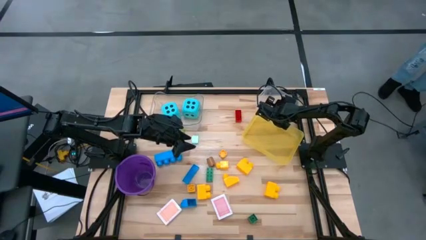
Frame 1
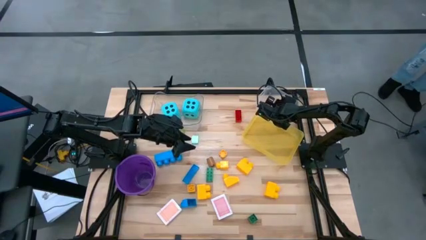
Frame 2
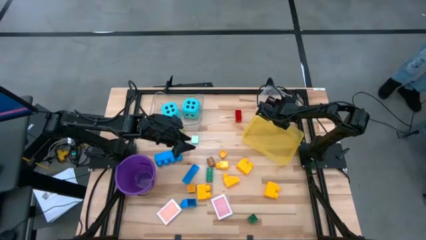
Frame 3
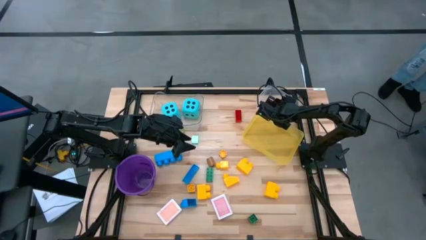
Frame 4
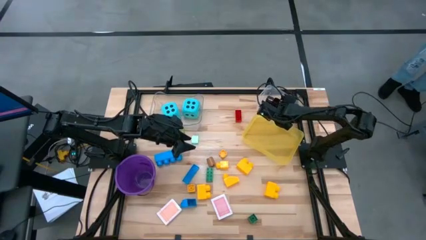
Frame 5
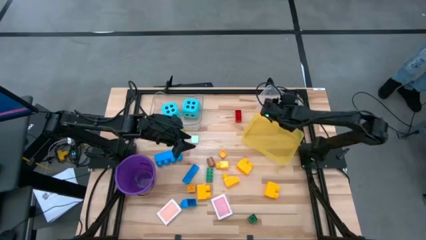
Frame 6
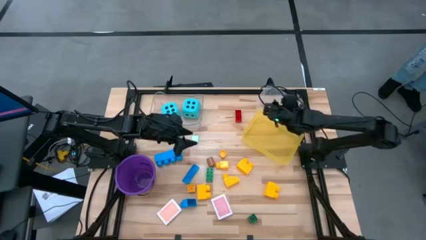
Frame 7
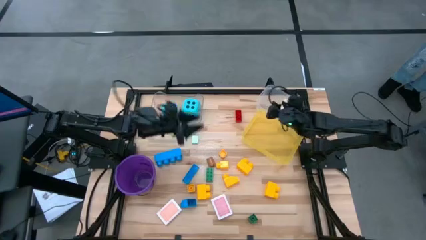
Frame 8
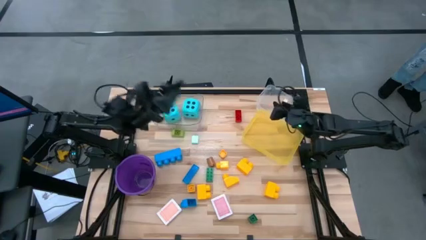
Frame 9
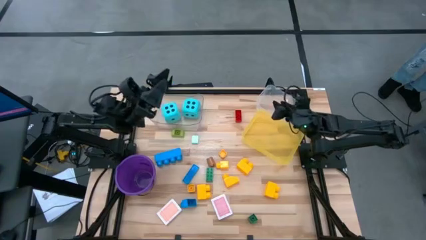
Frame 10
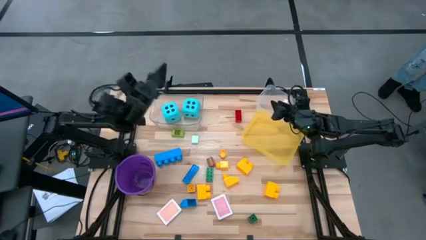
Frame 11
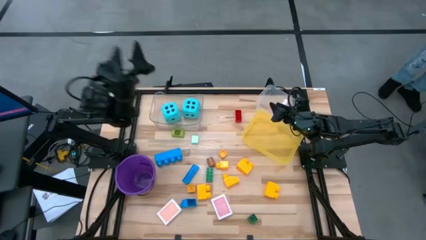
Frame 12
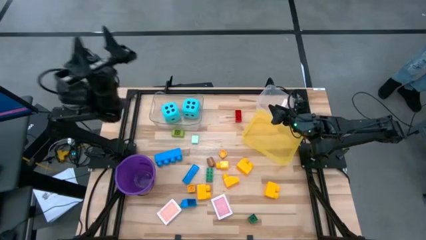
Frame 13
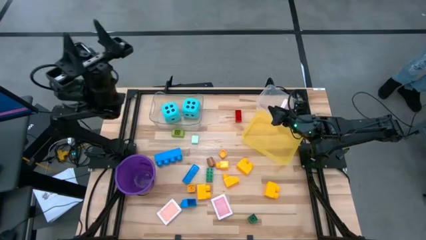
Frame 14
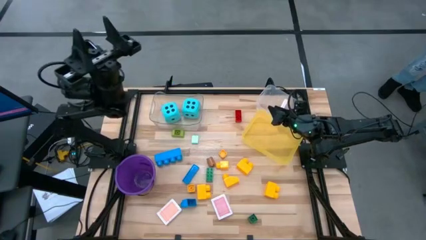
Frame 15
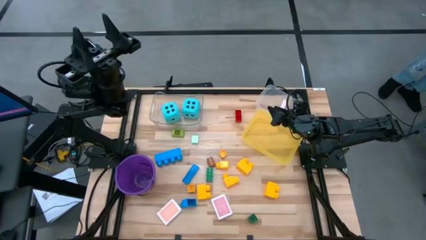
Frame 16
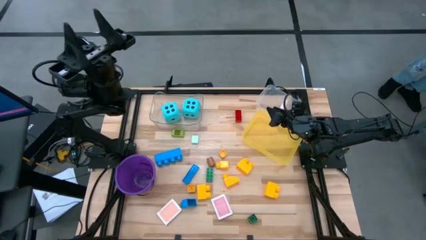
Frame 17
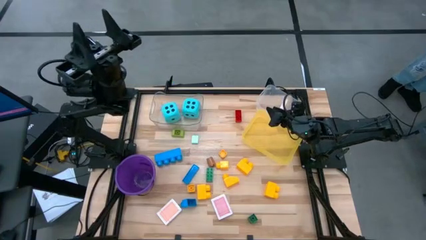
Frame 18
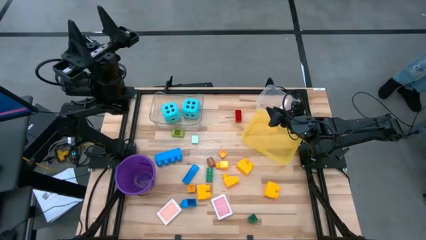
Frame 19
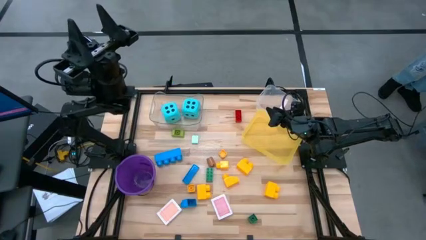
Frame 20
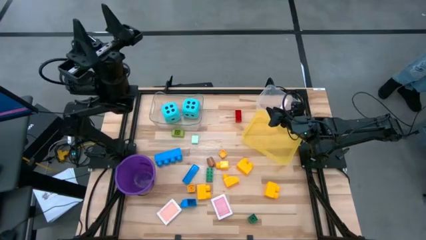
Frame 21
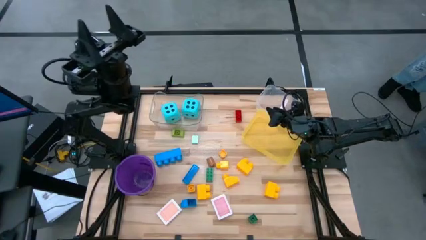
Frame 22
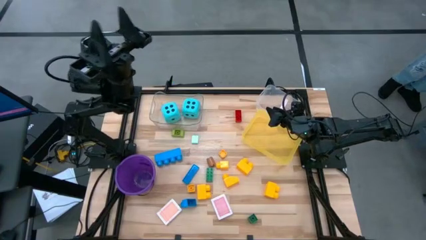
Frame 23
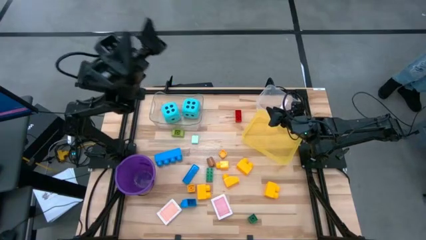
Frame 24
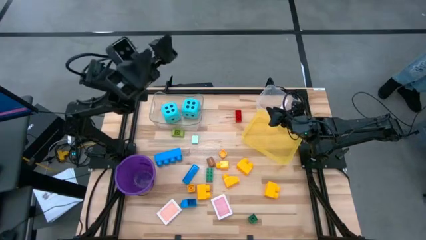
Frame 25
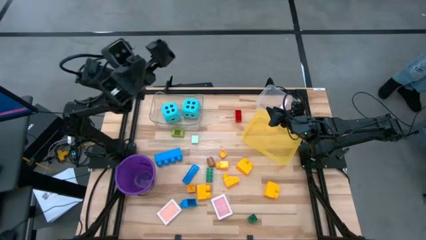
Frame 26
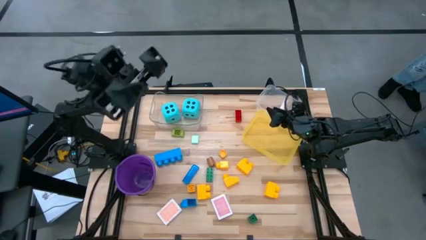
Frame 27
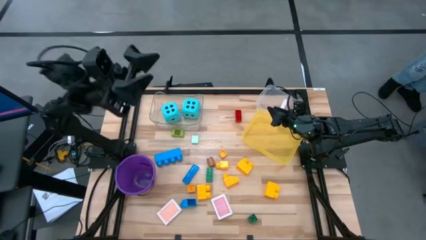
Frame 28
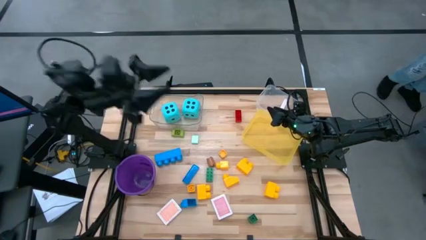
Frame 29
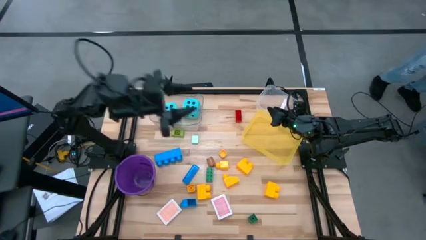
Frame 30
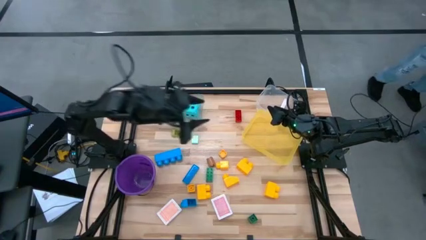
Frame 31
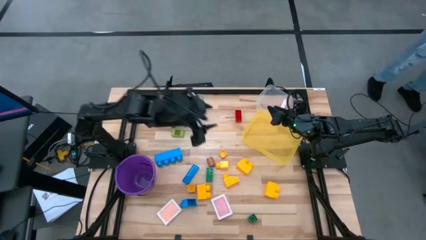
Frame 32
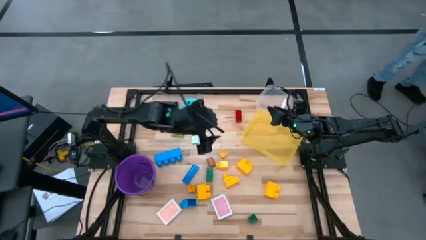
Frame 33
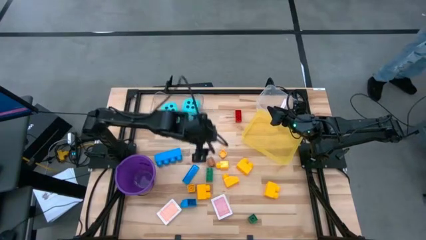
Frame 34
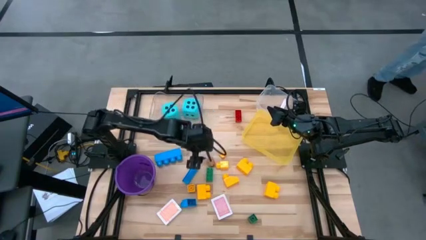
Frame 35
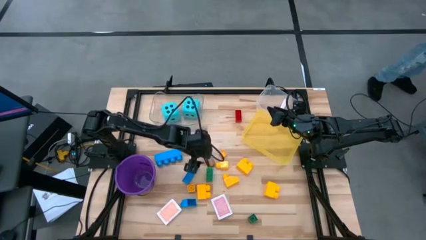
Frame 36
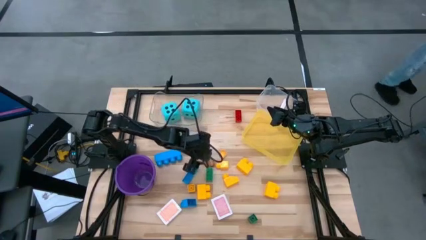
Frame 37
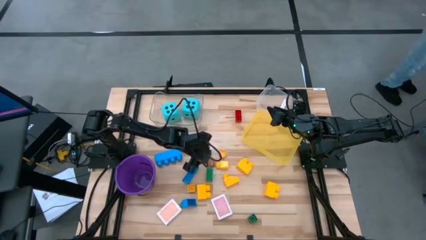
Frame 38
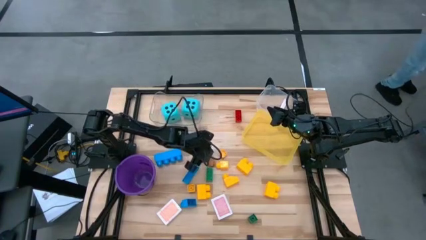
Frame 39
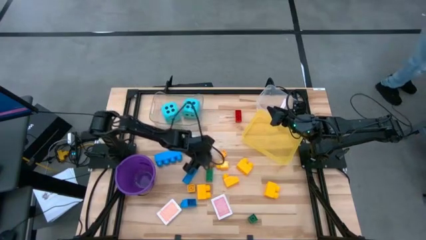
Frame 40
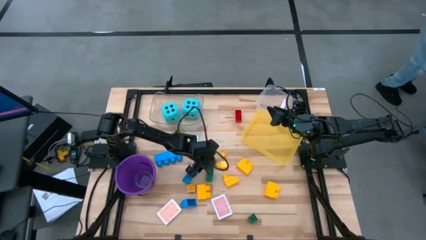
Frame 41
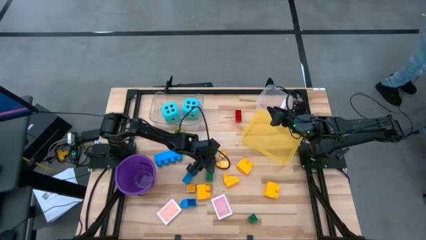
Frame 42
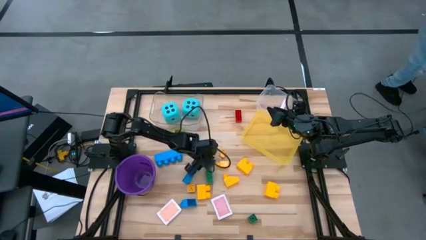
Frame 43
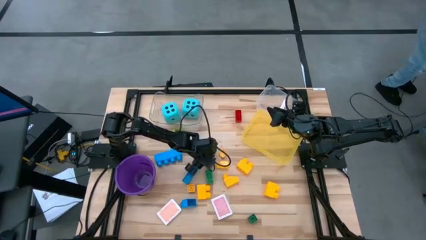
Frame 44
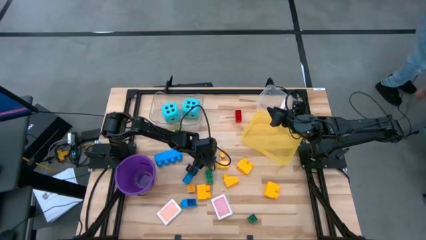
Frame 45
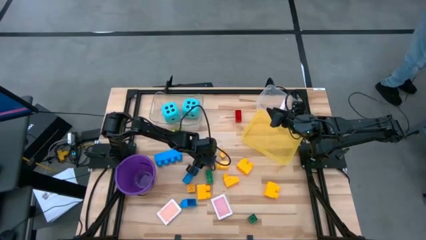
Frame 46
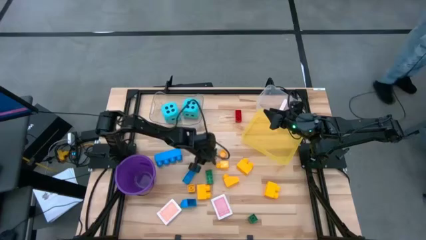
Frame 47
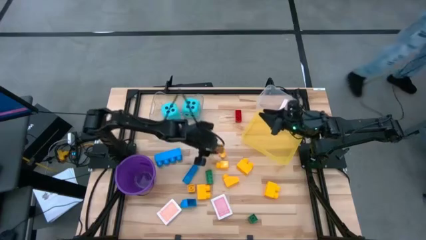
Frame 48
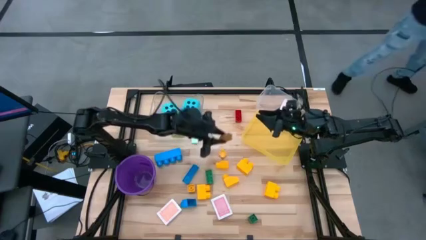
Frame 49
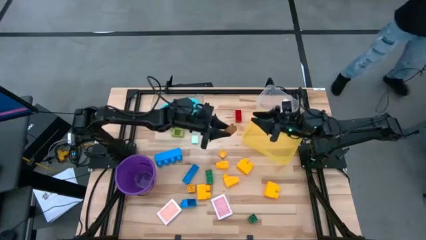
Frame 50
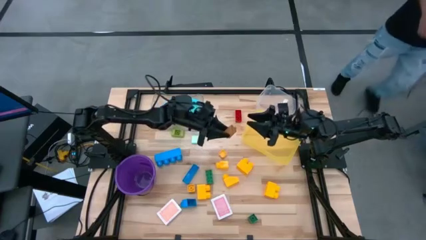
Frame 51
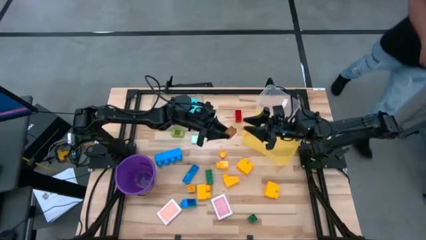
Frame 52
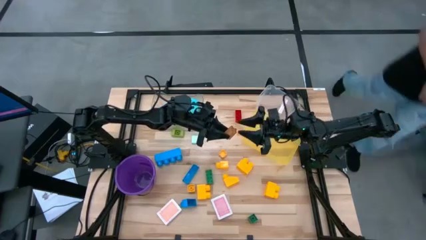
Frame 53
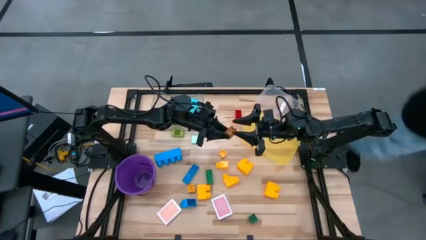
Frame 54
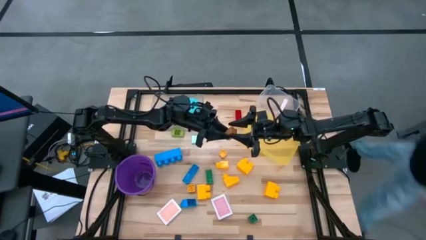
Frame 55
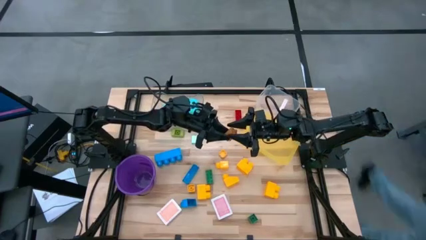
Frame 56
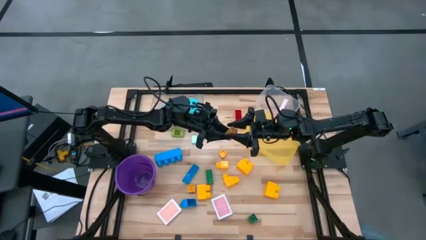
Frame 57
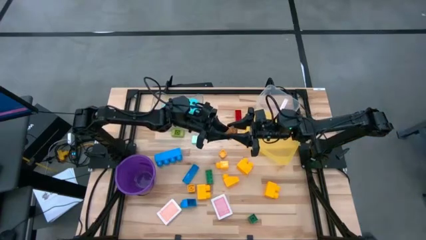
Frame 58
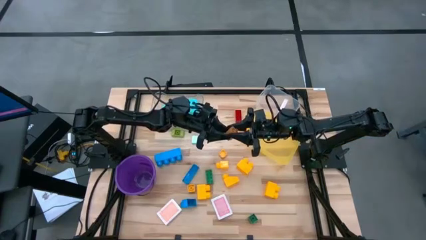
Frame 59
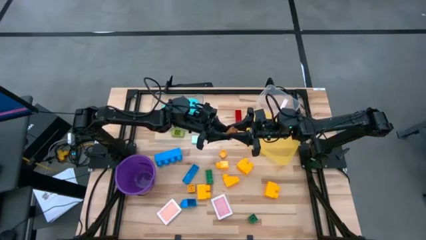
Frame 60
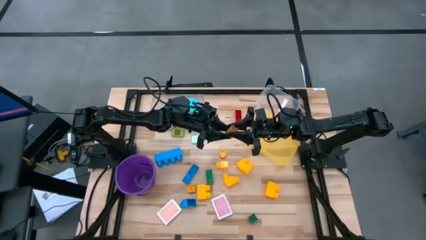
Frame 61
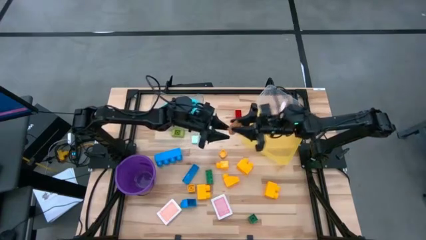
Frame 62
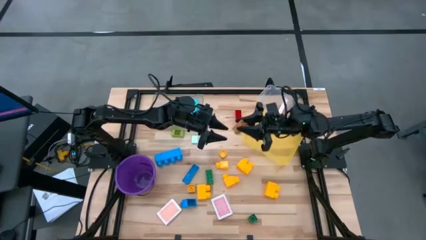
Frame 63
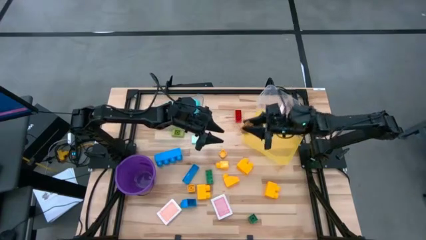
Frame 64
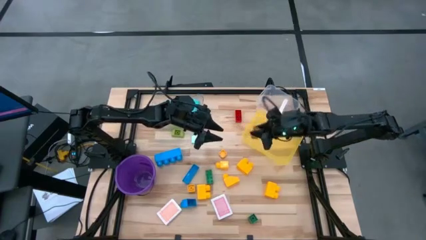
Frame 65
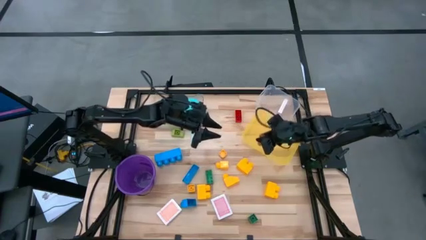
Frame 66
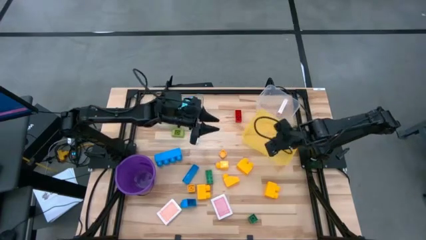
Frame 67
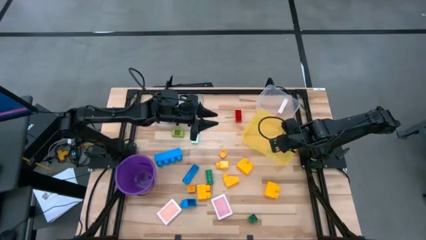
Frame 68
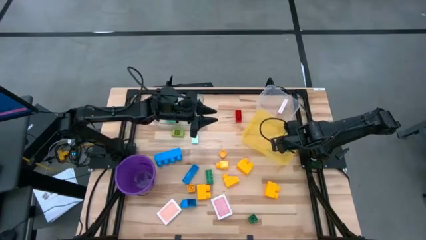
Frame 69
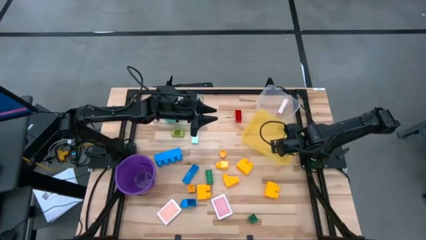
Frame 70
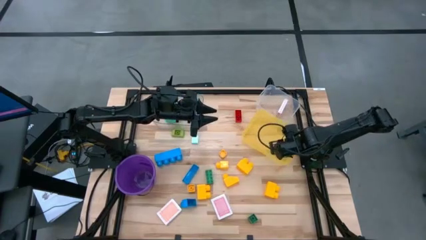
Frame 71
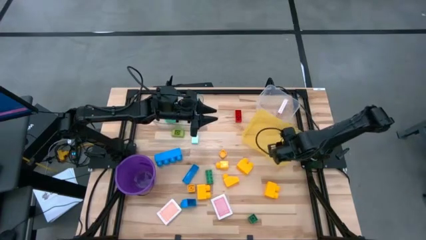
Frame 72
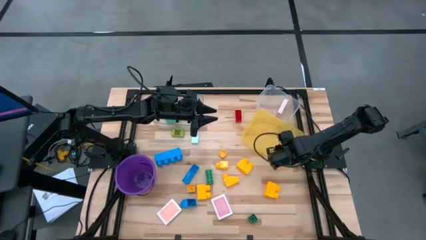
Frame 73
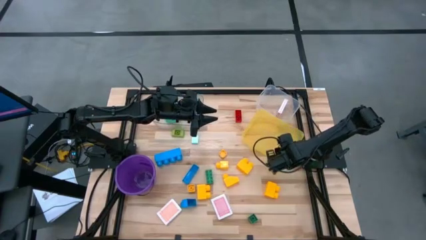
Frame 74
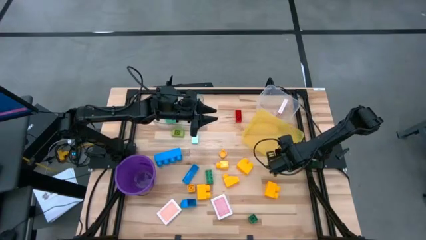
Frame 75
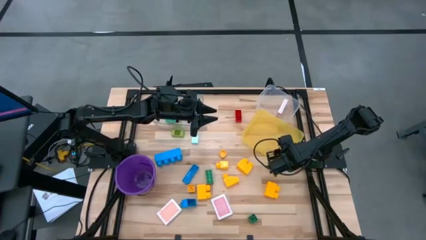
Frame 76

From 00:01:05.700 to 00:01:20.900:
Task: Pick & Place Toys
Put the brown game piece into the yellow bin
